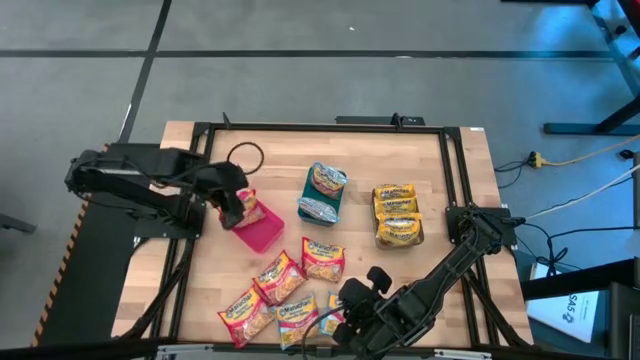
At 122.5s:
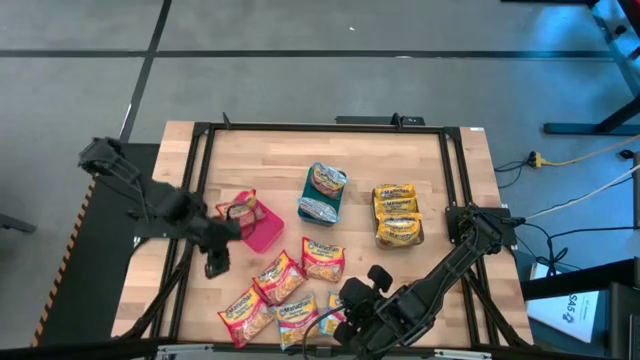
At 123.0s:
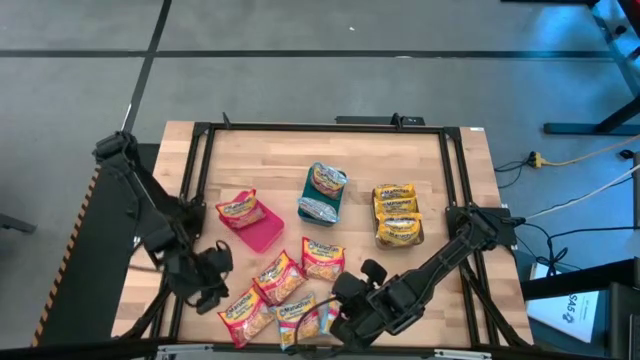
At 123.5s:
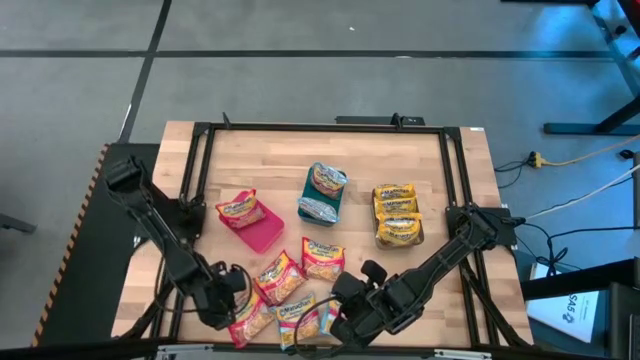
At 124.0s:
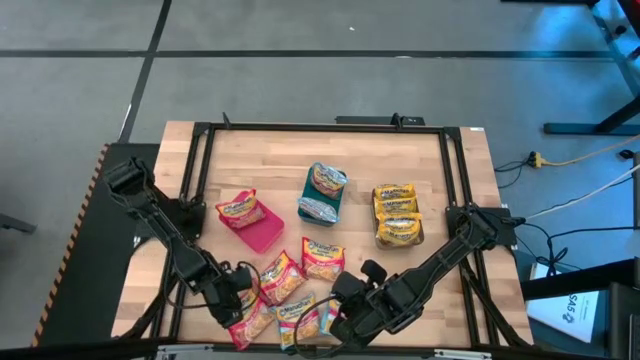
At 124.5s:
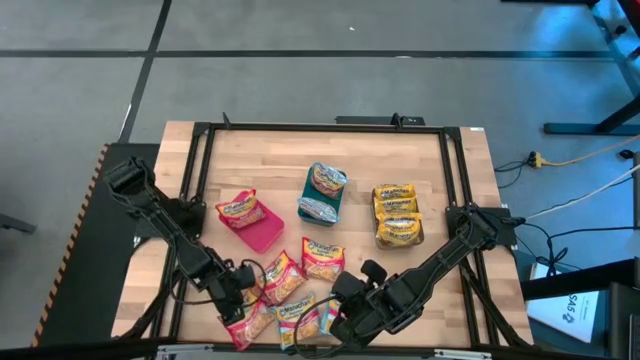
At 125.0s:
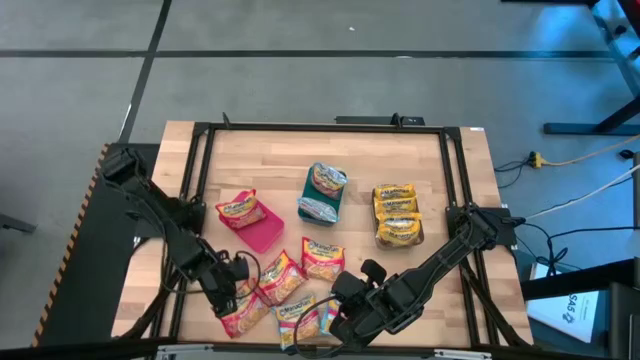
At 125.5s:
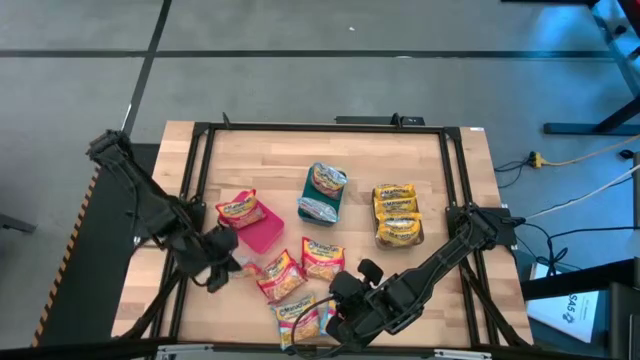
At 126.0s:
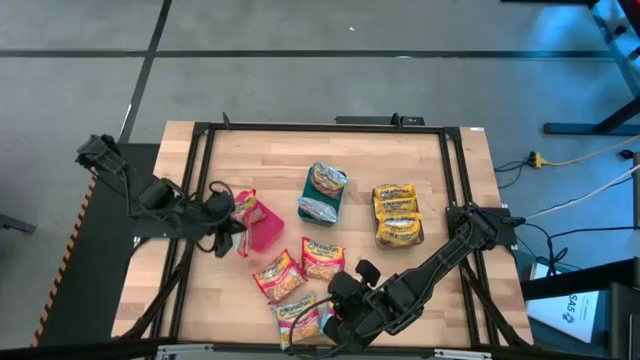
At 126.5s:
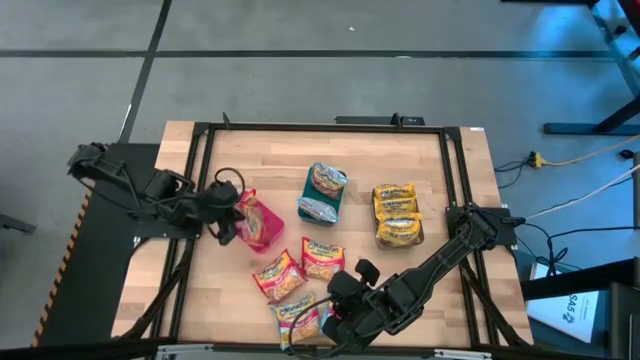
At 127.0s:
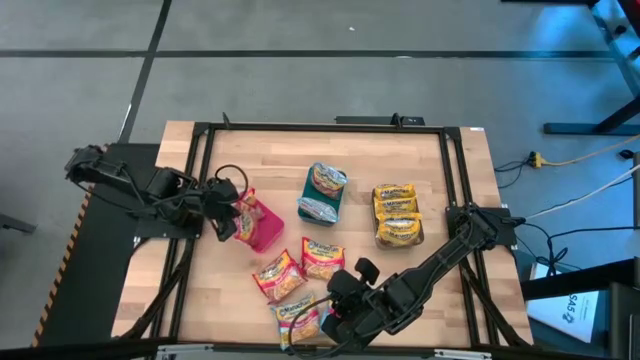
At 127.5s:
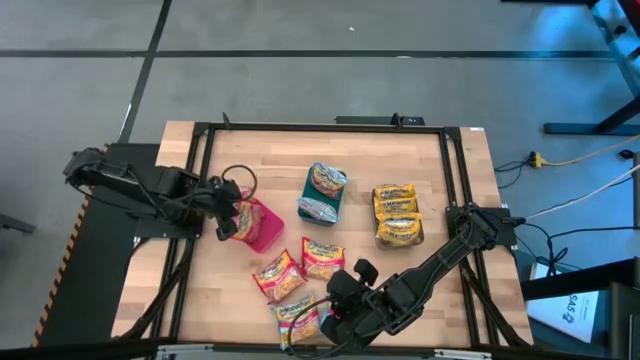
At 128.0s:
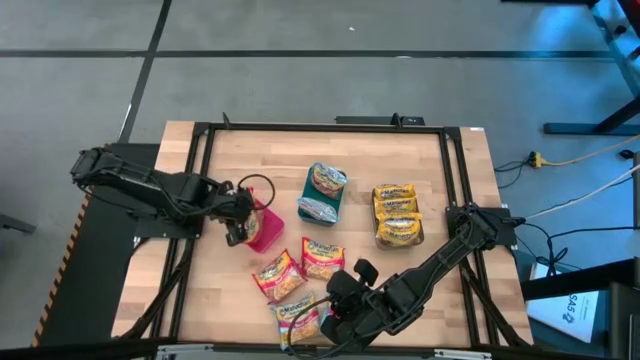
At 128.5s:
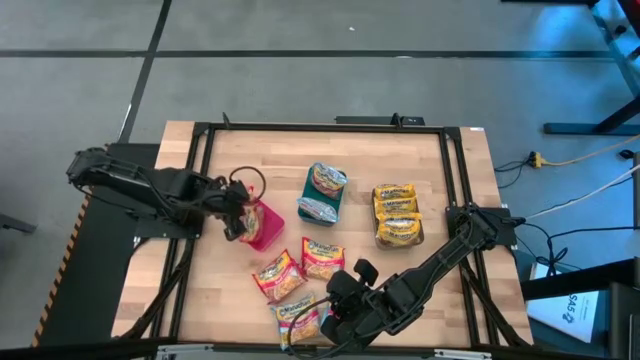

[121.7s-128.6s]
Task: Sort Maruchan noodles
Put the red noodle pack into the red bin

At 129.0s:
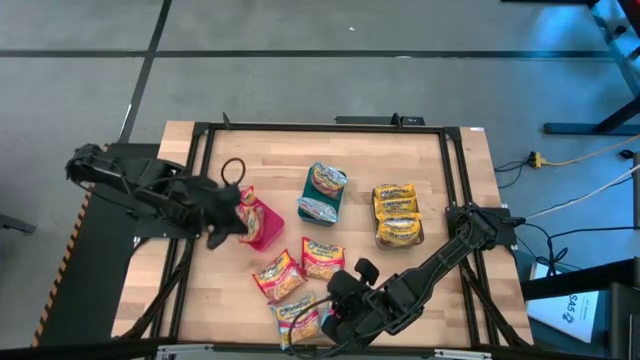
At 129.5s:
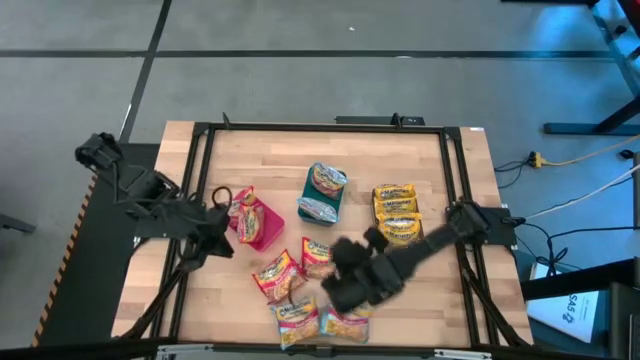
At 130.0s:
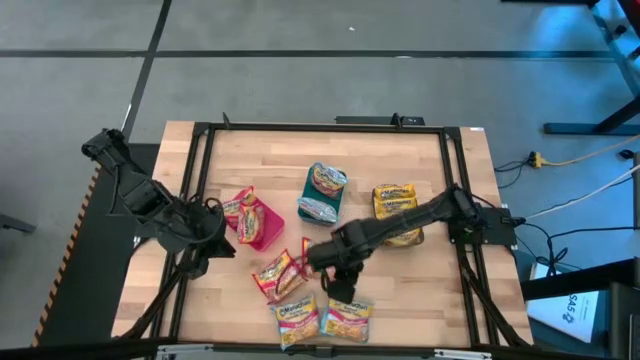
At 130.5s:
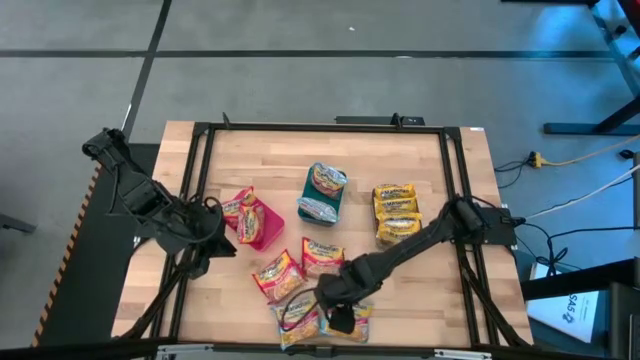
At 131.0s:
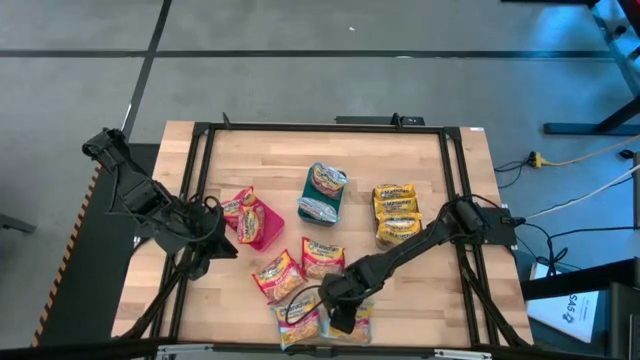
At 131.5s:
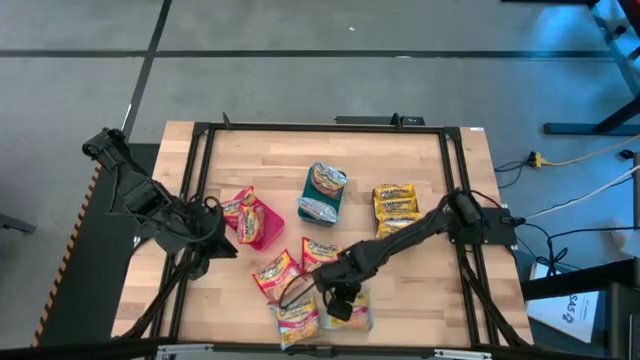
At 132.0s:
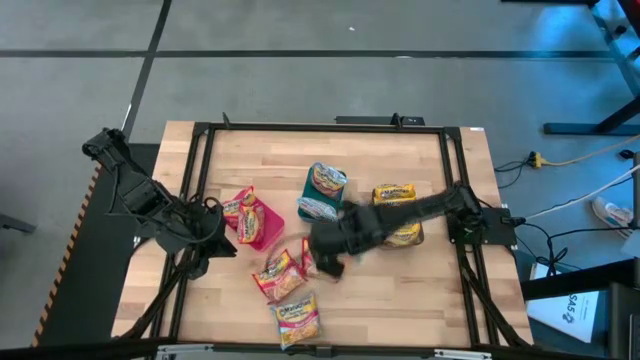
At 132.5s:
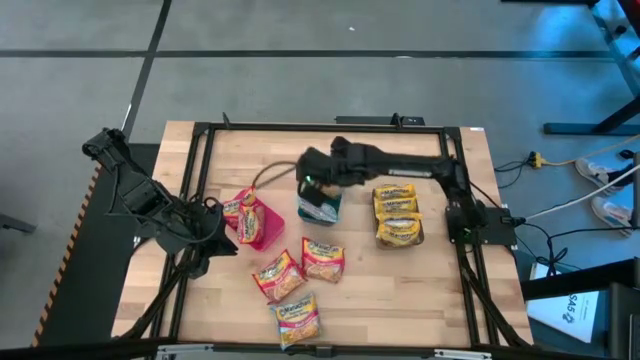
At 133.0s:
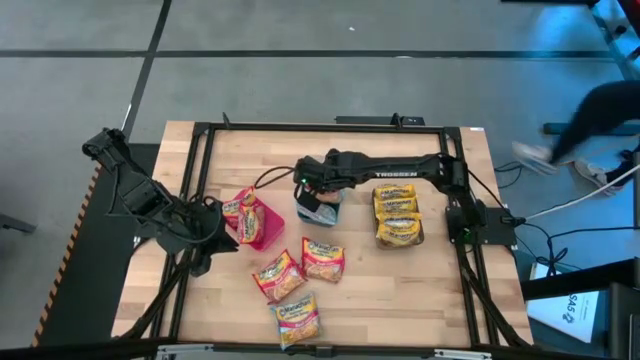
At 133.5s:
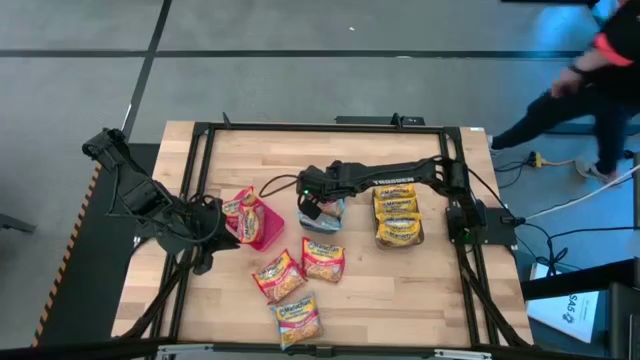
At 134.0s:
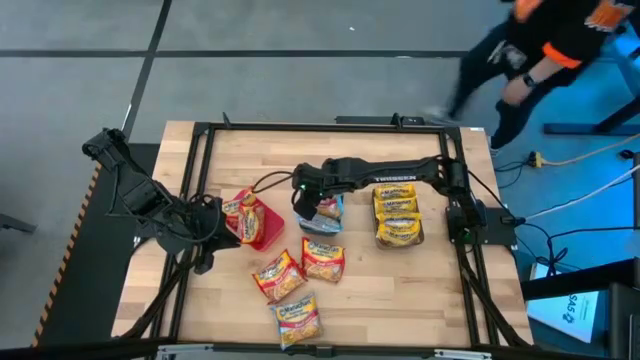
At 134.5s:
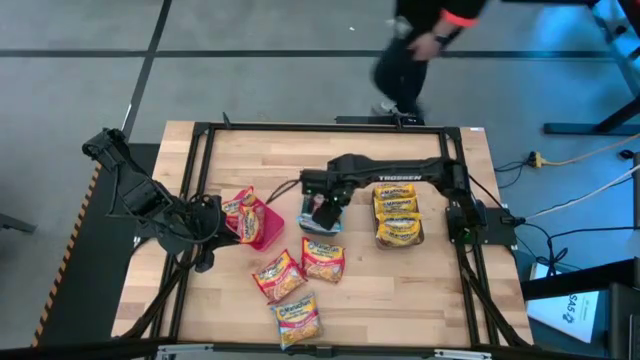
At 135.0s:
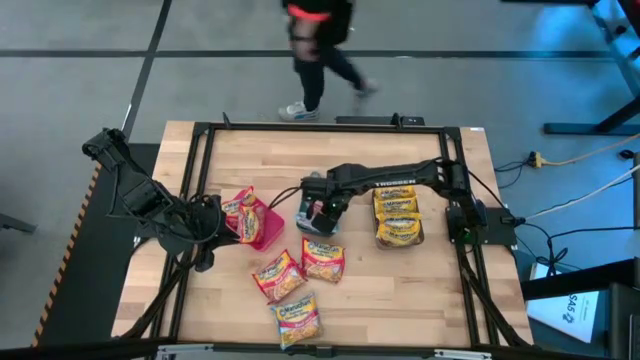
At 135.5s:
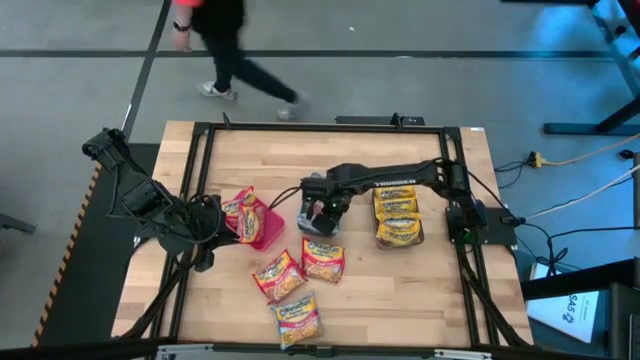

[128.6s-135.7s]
Put the blue noodle pack into the blue bin
